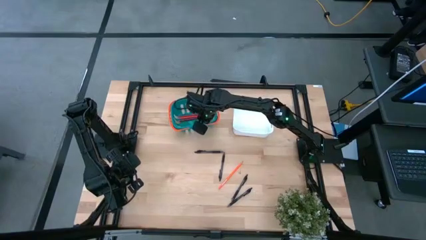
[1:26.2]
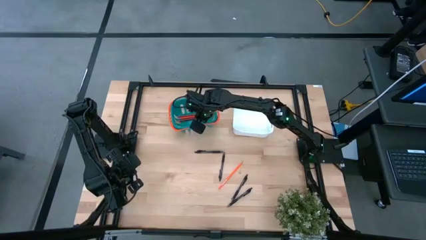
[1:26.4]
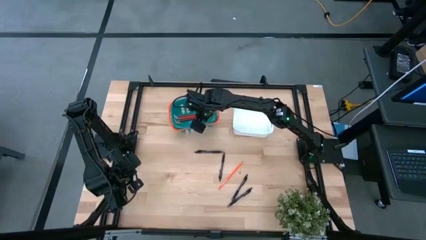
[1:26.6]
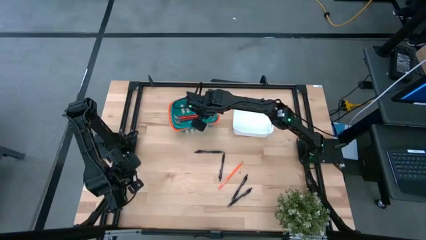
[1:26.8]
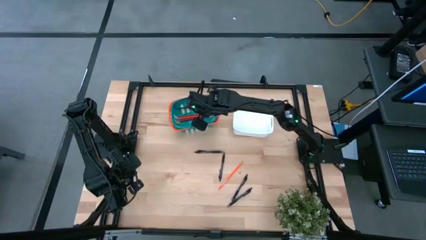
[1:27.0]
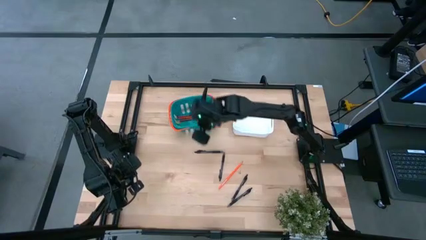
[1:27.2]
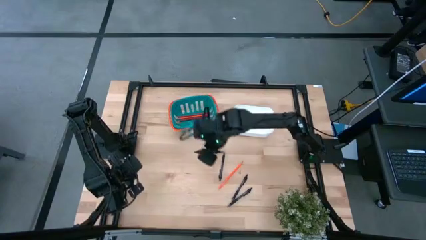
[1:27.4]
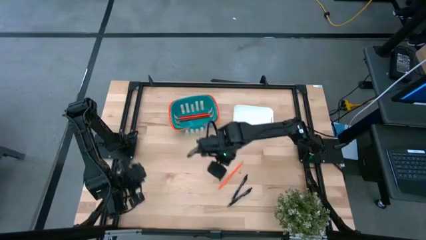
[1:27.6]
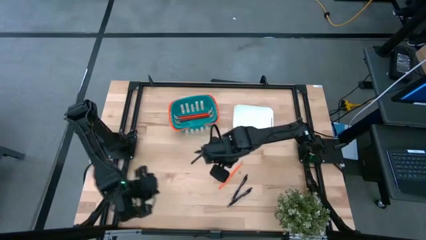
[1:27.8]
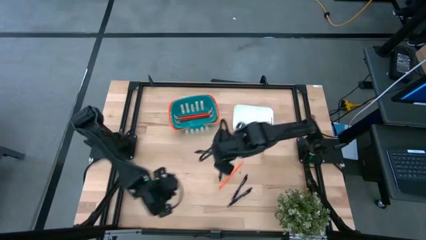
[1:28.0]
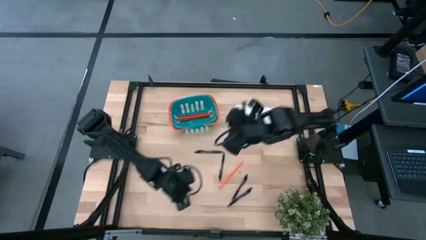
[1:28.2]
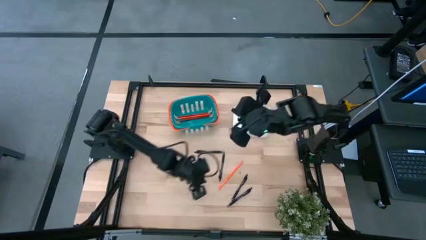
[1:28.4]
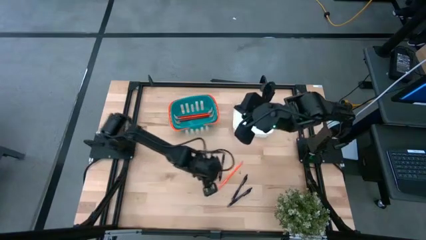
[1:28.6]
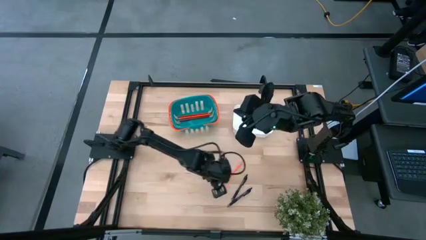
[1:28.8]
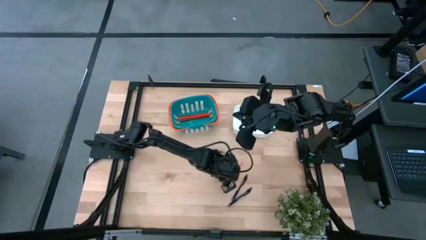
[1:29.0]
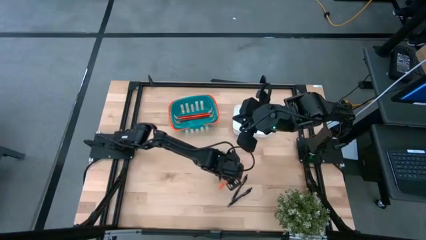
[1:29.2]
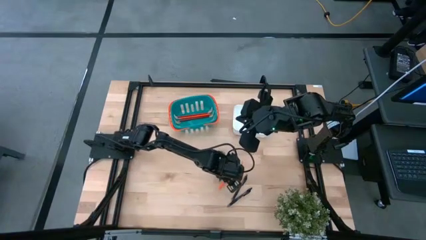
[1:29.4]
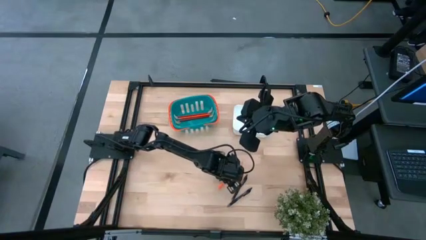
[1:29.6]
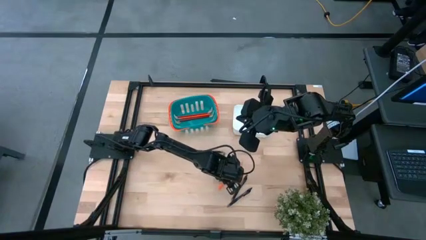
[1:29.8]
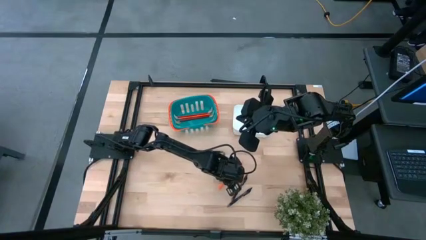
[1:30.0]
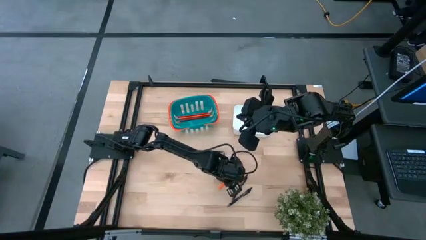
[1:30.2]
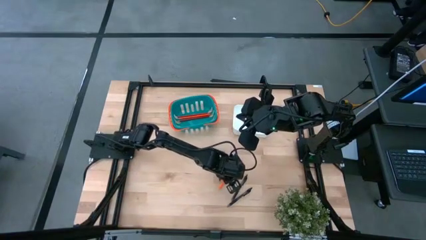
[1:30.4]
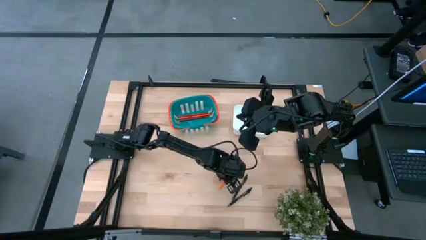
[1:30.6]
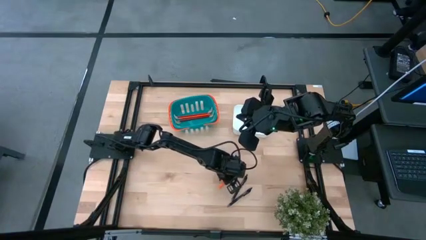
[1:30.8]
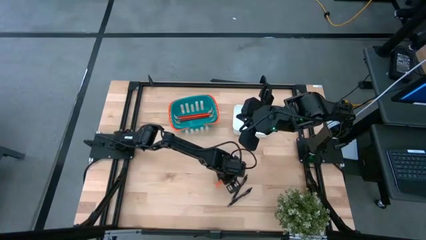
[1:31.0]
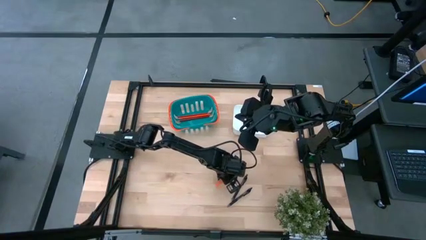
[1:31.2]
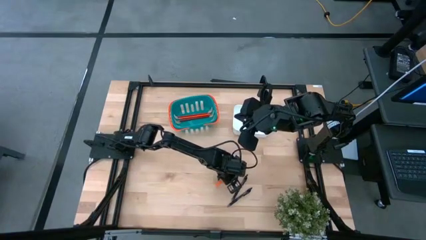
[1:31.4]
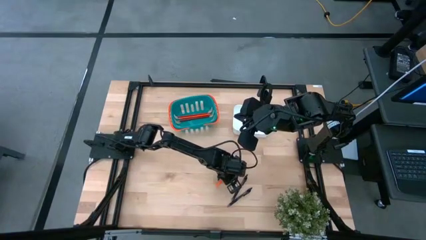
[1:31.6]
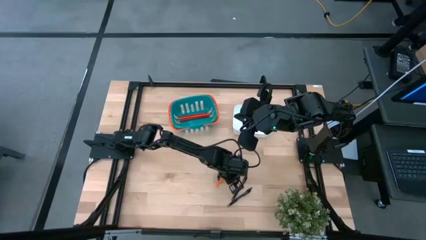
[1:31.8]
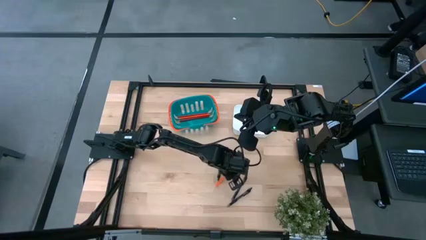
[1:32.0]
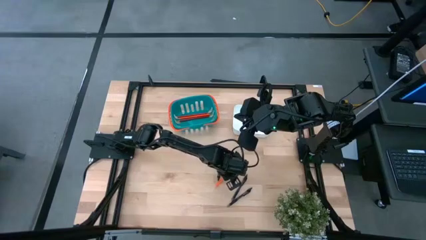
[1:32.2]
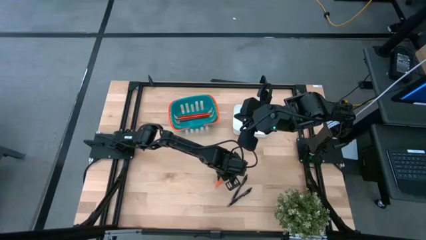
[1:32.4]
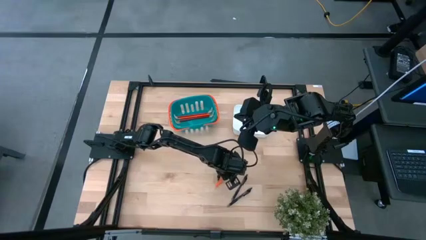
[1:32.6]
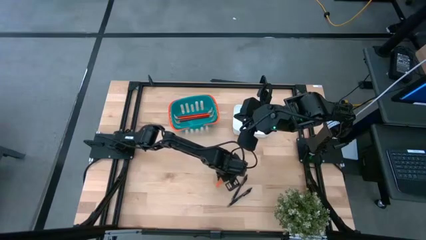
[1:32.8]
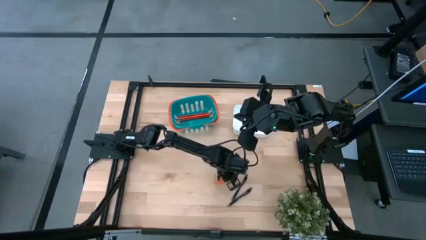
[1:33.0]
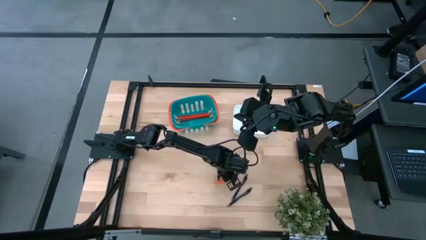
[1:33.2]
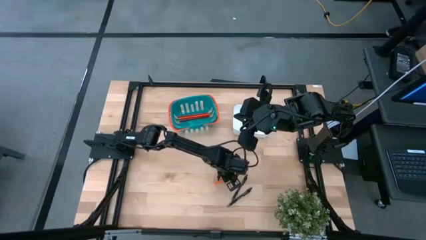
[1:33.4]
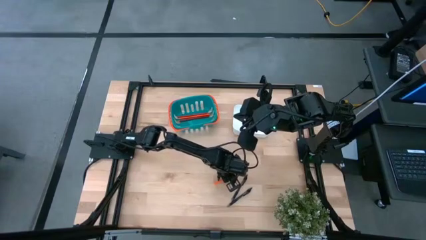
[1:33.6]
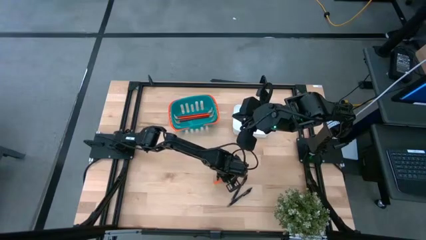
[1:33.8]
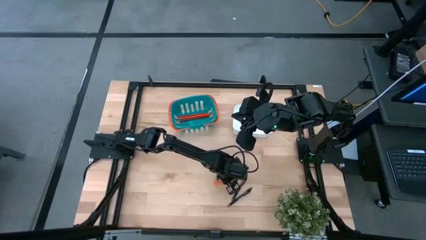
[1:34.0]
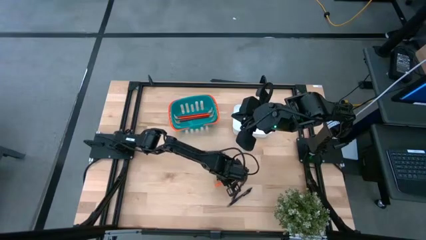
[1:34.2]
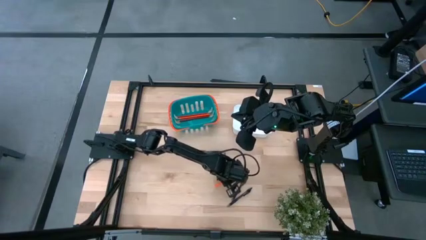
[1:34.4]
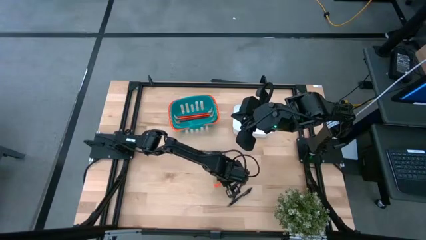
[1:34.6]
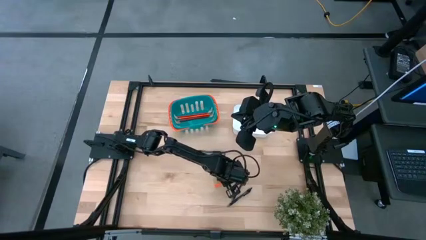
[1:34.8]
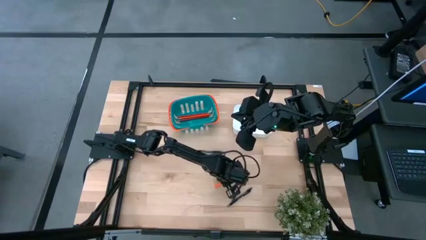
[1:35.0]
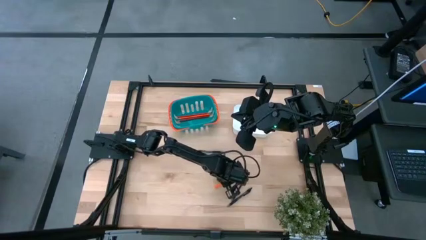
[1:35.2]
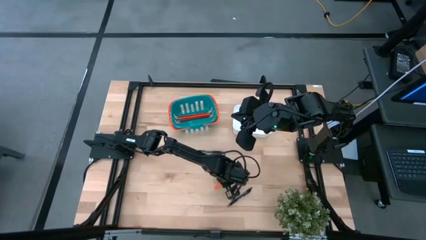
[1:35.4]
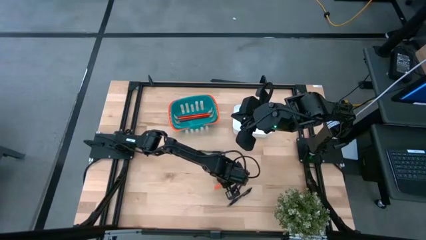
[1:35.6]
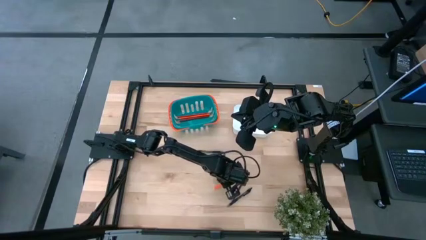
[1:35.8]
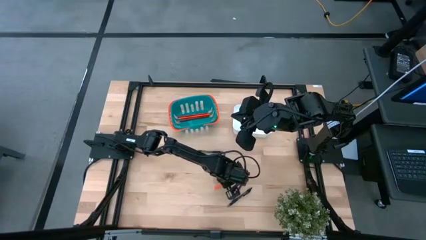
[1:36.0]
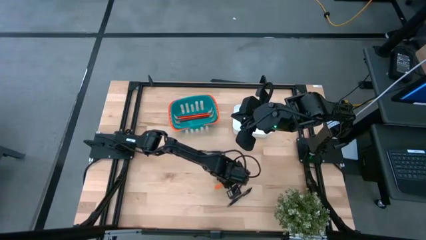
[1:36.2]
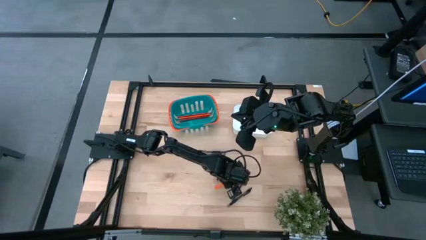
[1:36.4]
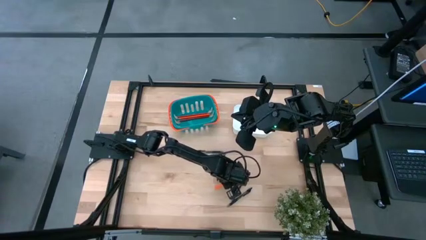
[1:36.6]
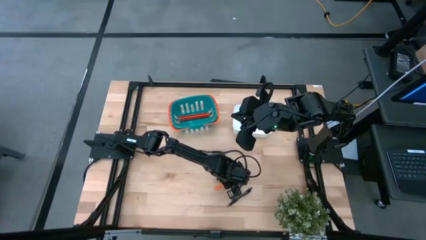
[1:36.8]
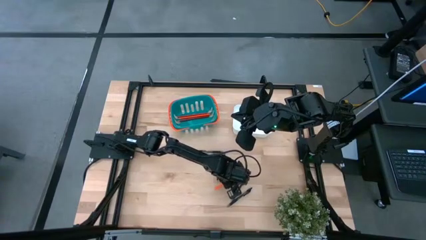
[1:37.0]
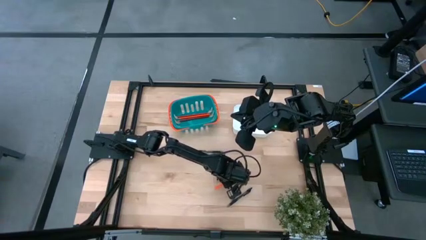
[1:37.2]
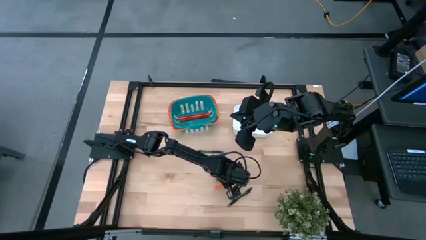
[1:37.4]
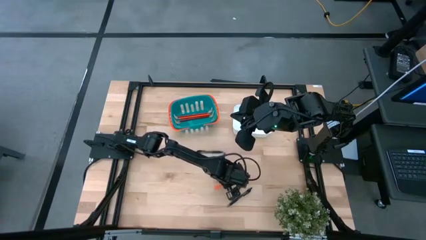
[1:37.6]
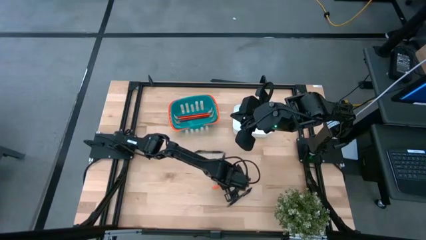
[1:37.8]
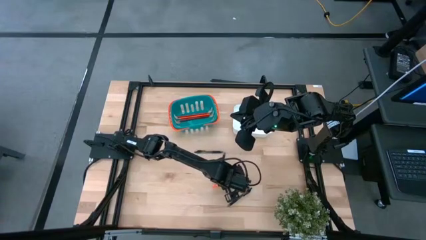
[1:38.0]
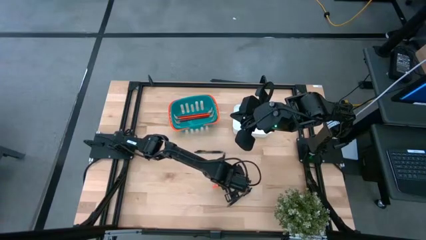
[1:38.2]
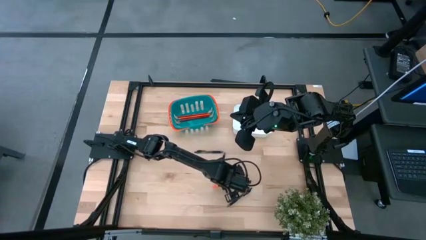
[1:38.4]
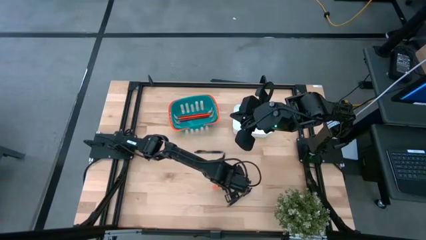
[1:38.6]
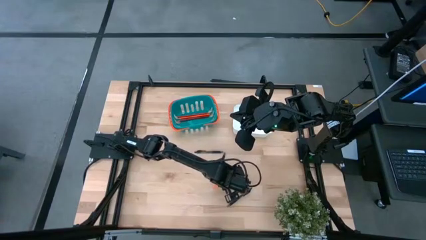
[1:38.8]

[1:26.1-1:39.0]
Task: Sort pens & pencils
Put the orange pencil into the blue bin

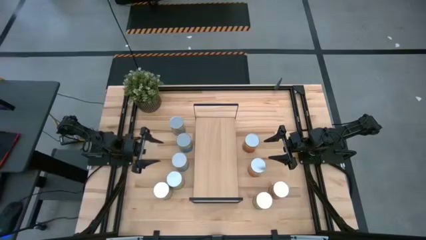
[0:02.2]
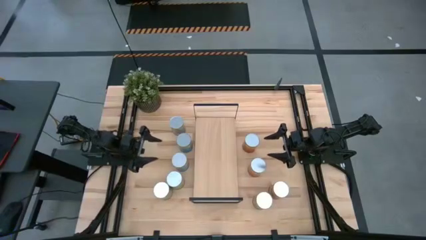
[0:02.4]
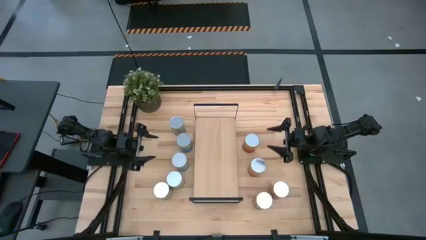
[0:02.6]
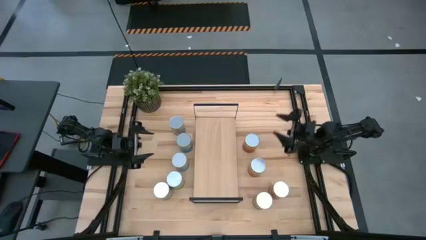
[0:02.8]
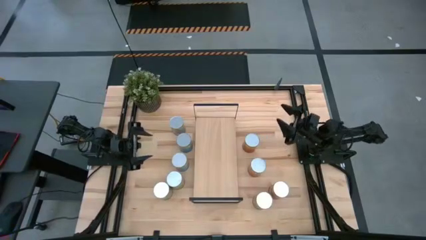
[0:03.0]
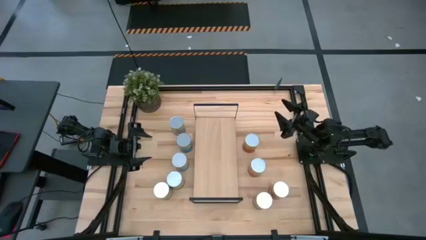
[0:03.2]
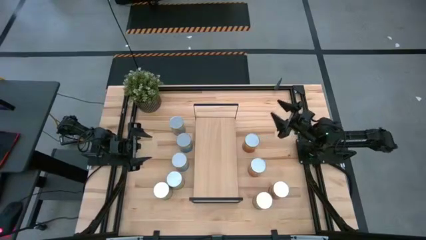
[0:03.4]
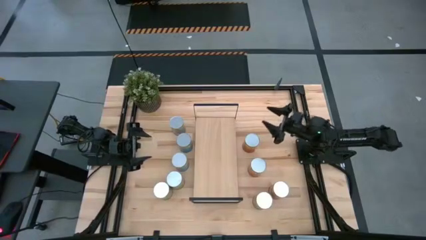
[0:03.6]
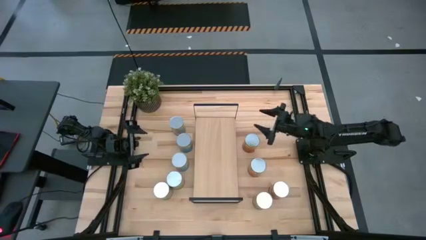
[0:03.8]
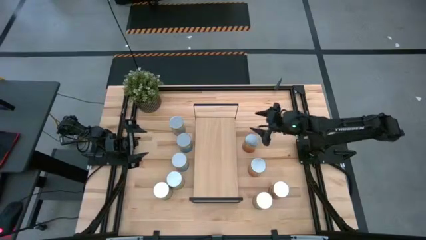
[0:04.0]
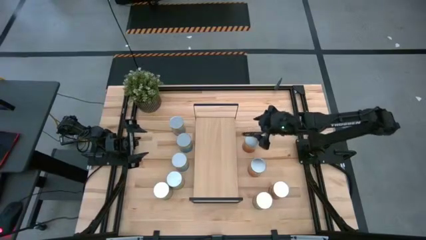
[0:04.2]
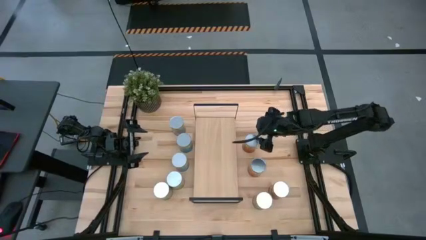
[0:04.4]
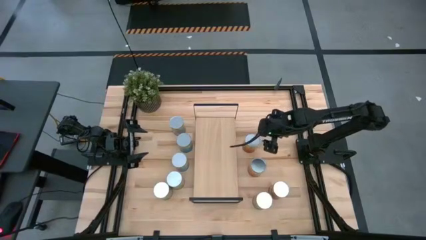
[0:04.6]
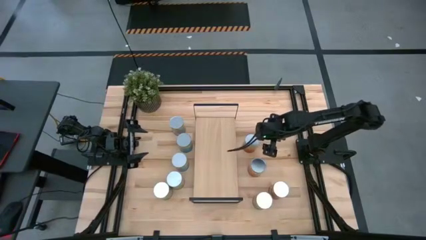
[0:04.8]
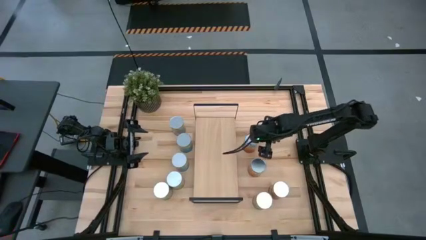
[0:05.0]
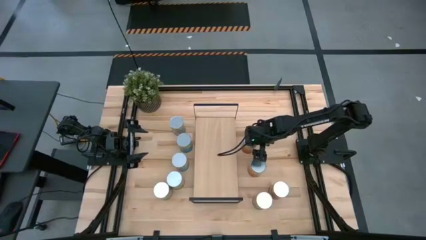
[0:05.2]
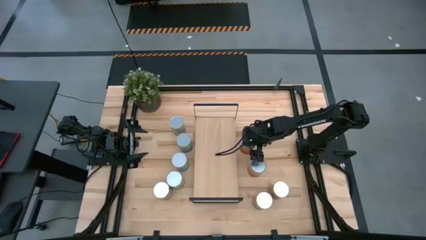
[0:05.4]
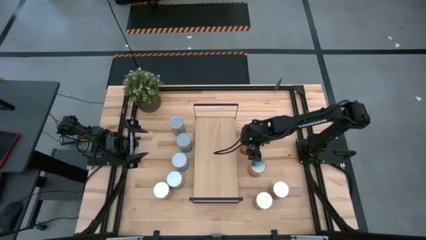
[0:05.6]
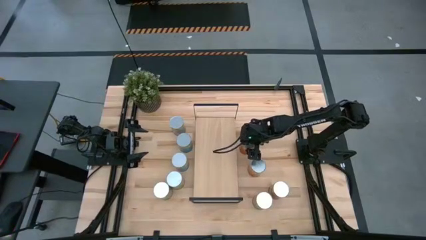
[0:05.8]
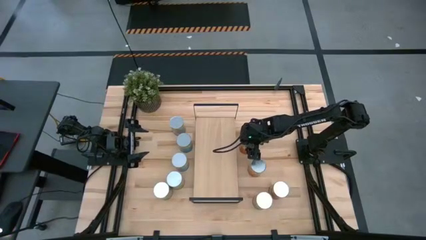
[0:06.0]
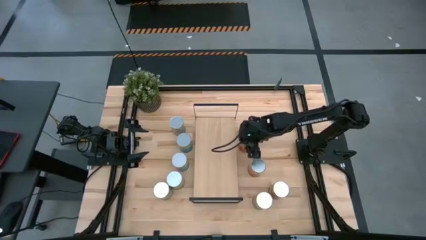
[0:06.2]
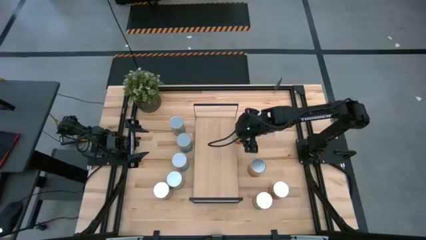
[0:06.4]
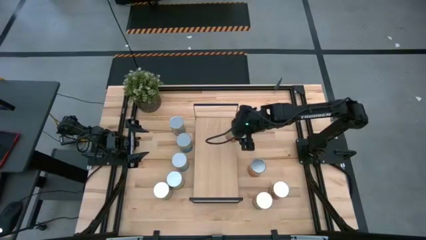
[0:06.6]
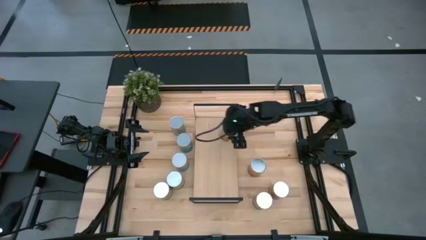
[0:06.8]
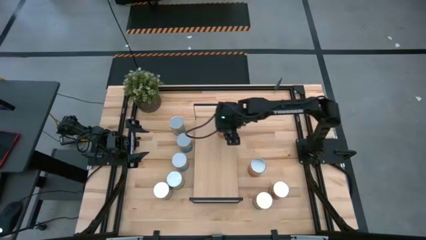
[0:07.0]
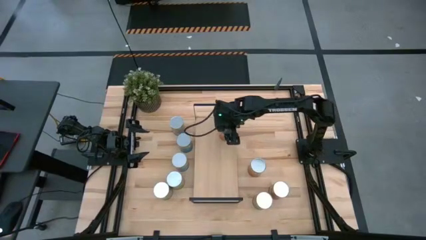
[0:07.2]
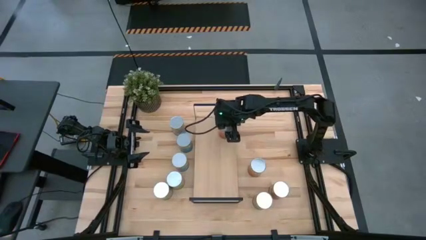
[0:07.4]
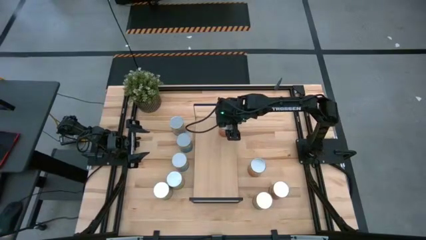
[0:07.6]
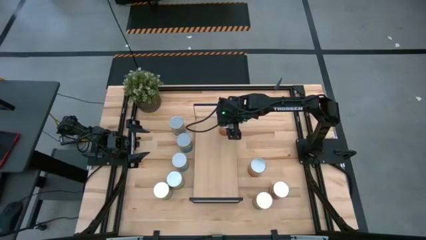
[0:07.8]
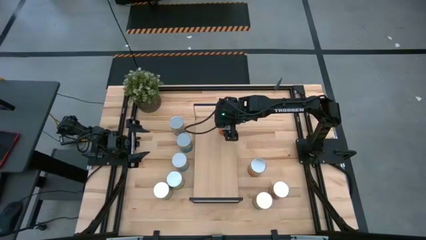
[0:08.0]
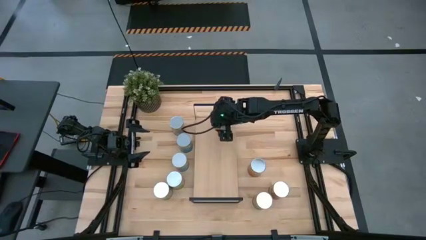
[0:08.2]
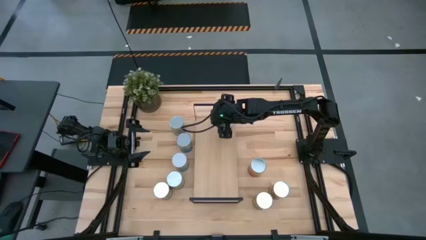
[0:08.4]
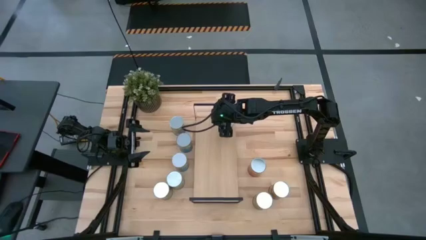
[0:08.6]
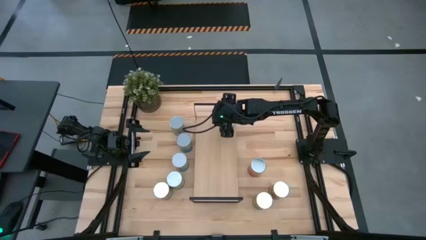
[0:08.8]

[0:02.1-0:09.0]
Task: Pick and place cans onto a shelf
Put the top canned pineapple on the shelf
